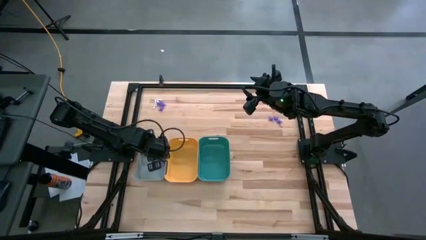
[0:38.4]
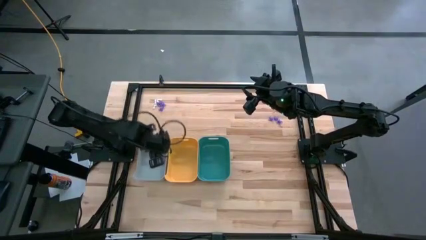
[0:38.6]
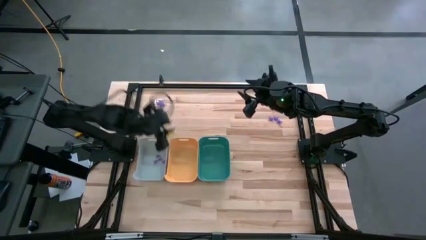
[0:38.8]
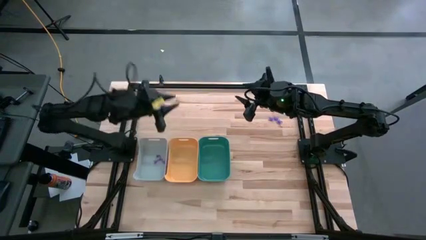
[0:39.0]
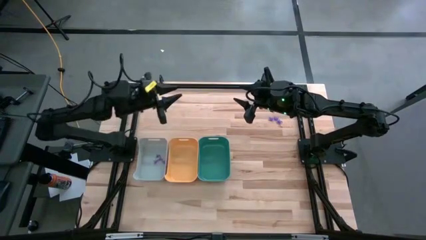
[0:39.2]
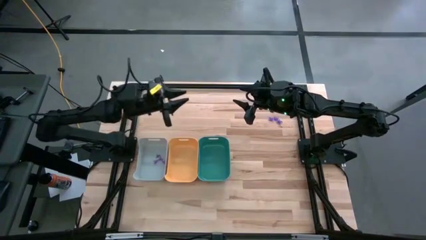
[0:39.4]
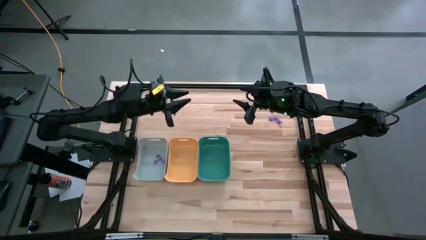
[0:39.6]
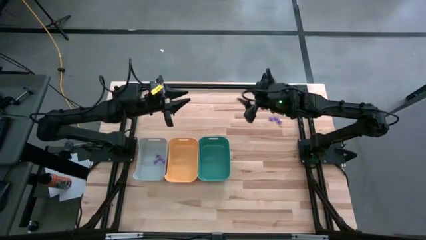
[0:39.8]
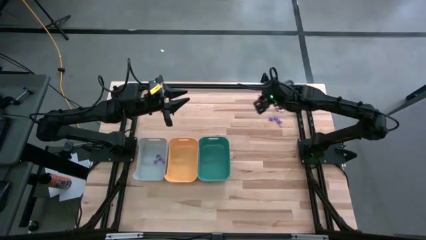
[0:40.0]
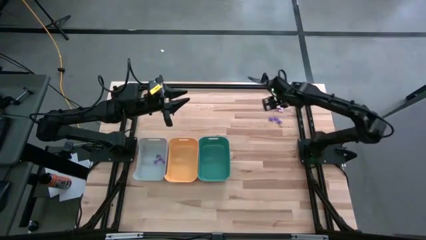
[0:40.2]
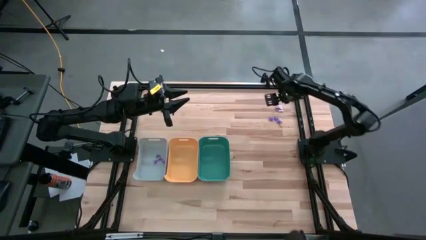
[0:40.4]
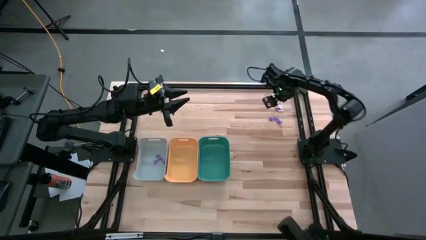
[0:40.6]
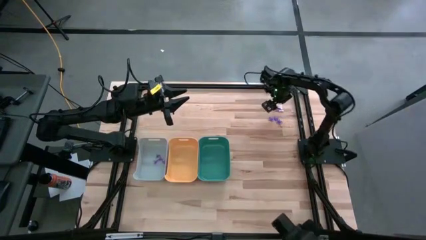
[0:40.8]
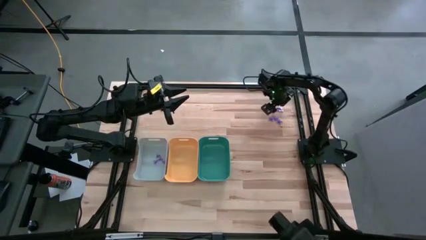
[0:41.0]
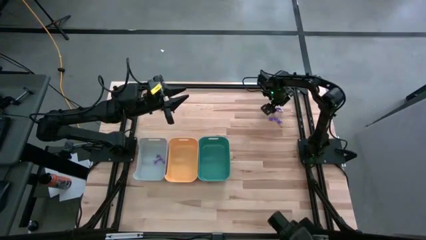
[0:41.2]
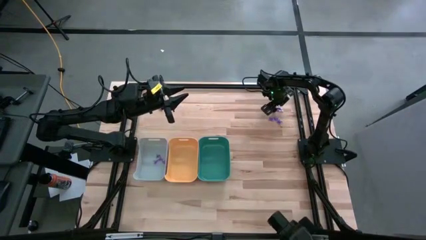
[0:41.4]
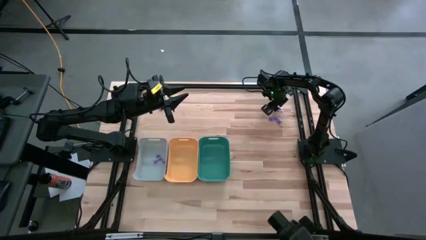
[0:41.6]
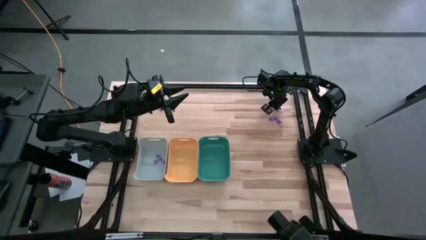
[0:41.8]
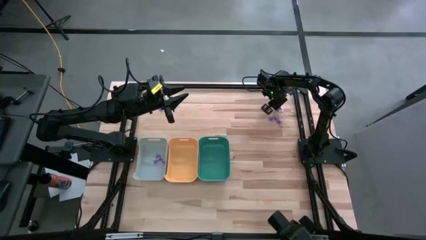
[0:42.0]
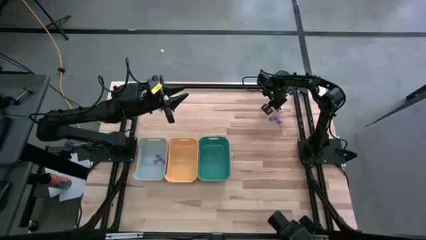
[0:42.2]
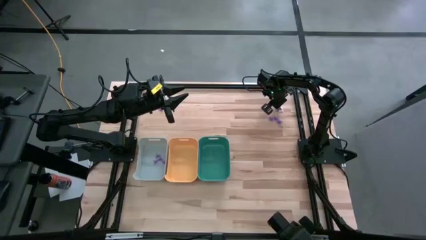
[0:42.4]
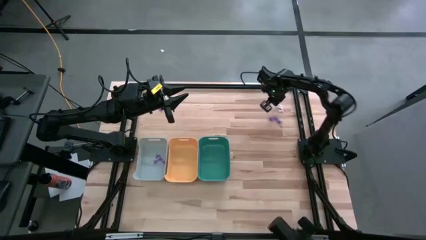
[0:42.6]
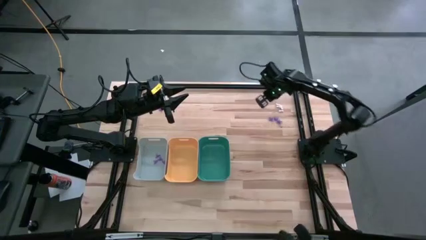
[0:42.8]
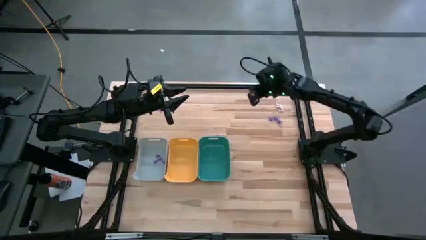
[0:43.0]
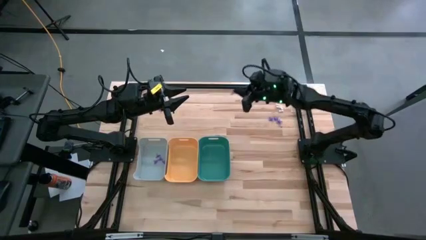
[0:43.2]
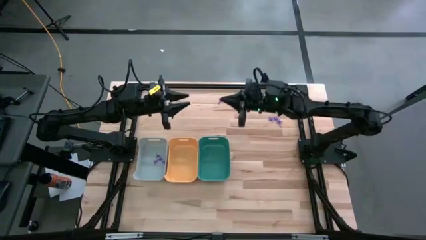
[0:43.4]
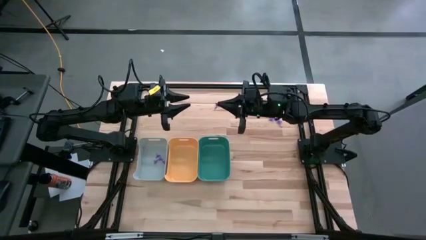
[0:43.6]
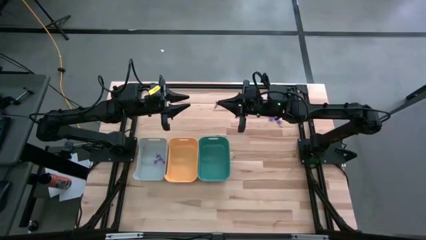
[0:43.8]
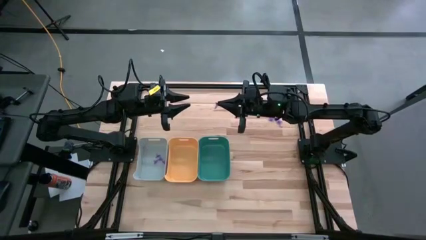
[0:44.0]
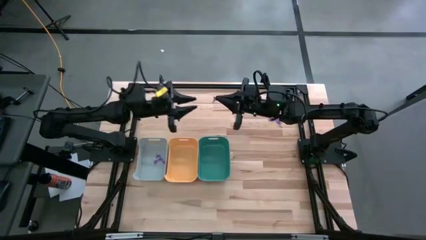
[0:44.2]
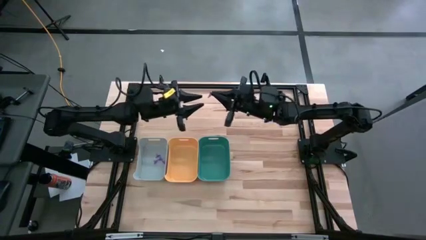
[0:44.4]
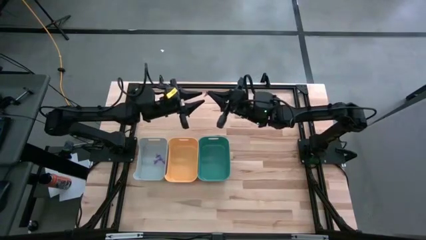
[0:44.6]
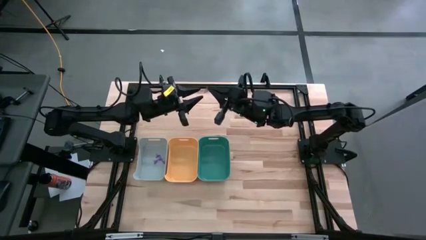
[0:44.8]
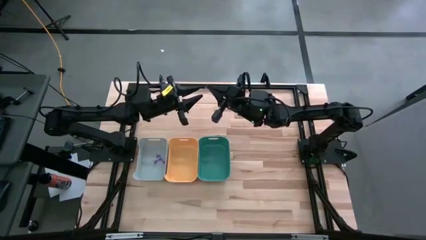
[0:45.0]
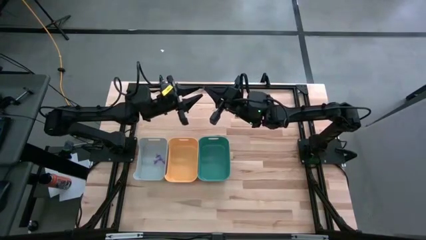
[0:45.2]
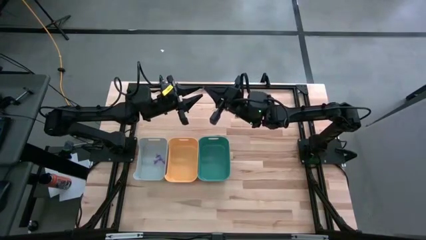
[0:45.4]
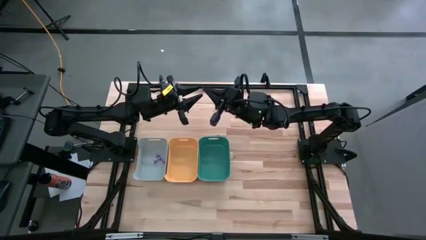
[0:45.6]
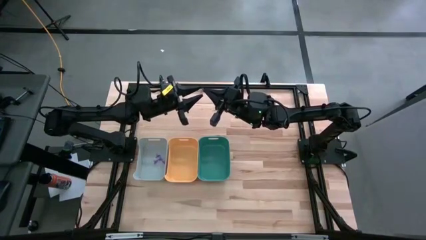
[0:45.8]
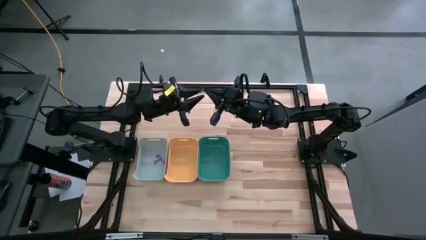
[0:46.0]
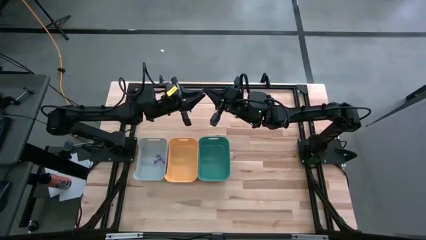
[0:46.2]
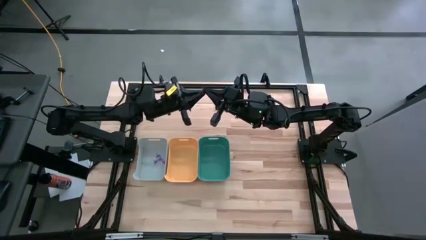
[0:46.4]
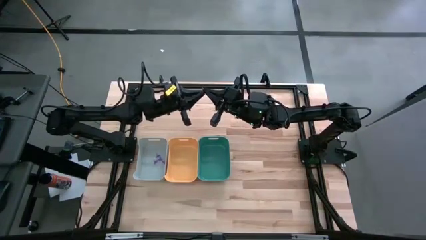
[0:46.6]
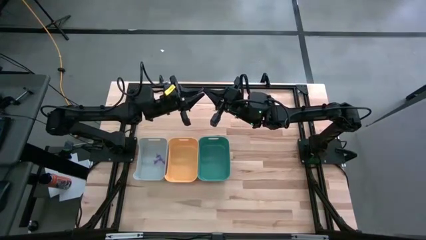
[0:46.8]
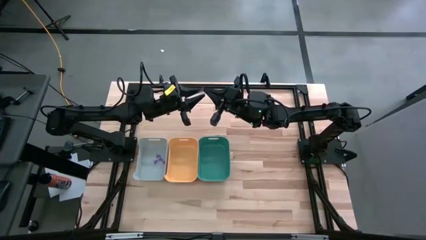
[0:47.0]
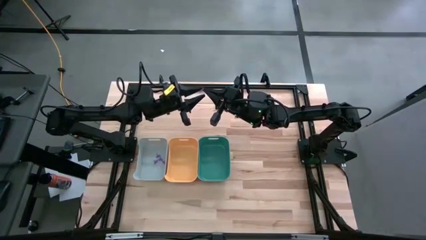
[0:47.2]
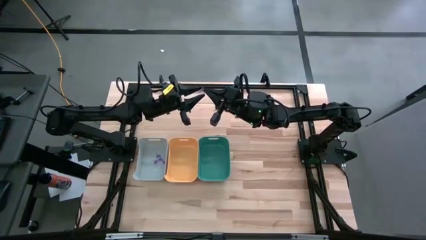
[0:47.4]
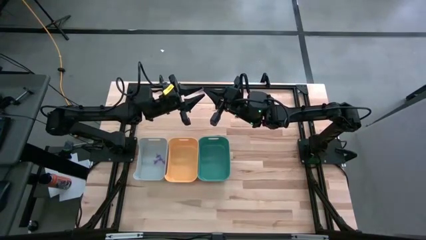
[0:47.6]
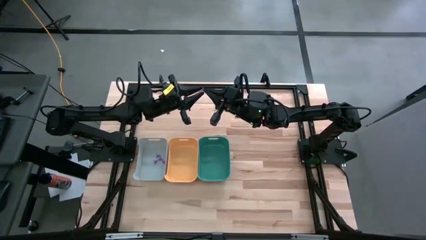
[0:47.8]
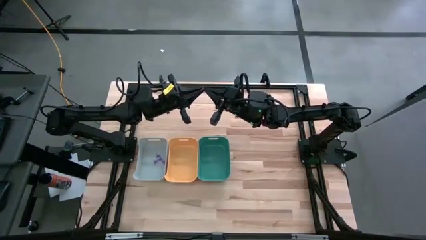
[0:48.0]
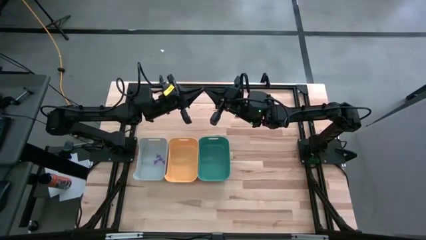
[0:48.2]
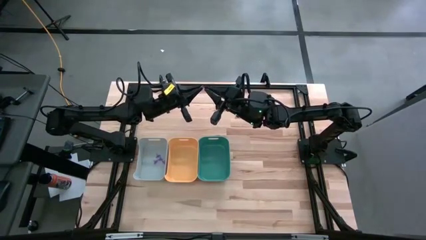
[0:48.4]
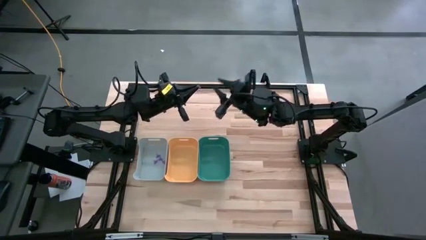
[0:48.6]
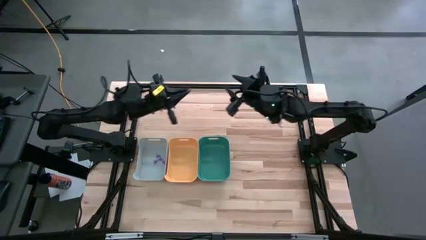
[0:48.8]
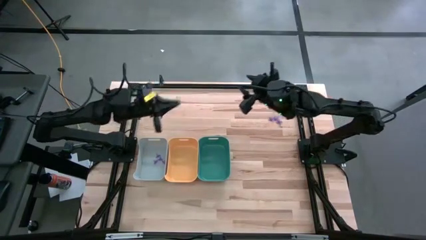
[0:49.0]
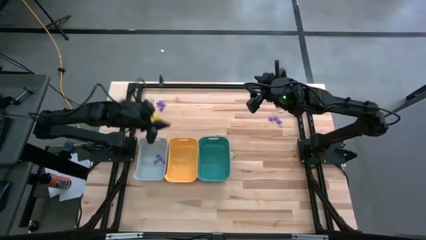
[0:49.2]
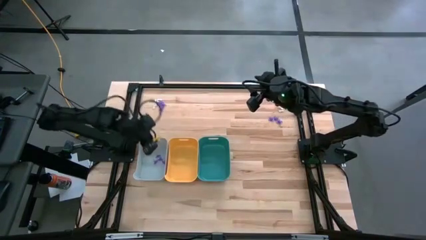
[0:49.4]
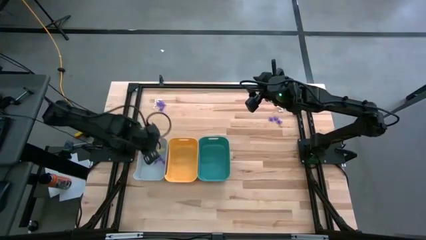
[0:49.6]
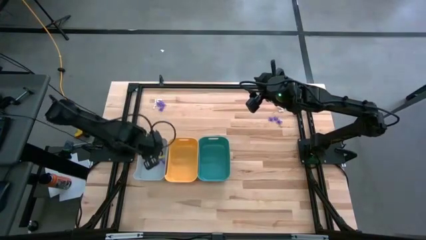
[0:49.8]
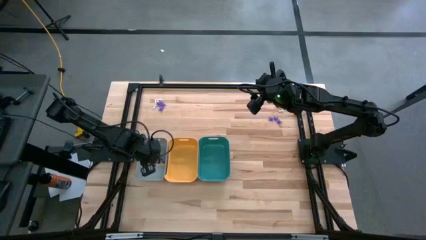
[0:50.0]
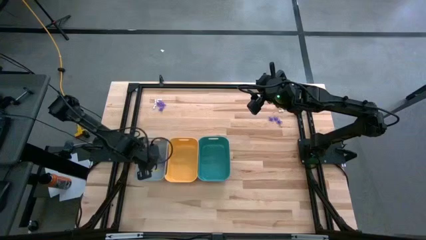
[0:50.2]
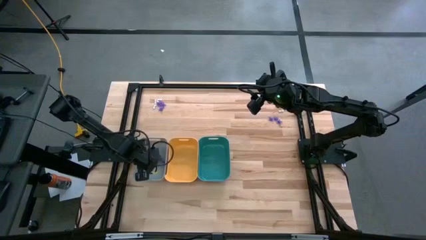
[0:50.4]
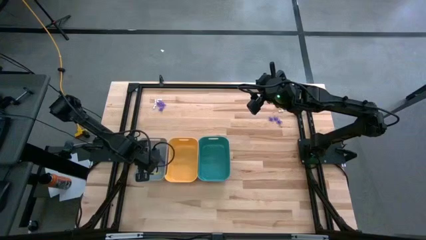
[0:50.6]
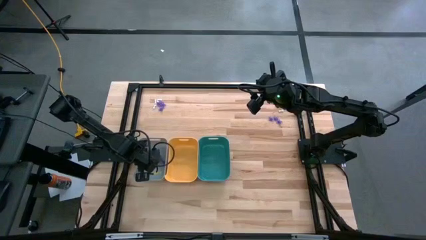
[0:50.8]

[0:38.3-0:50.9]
Task: Sort Halloween decoration
Put the purple witch hat toy into the white bin

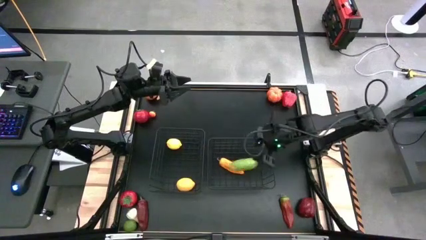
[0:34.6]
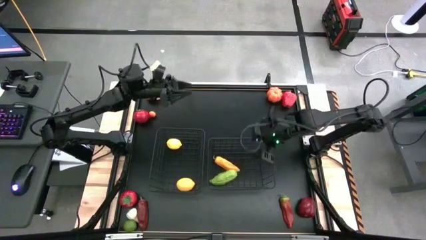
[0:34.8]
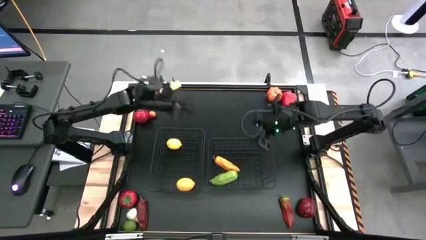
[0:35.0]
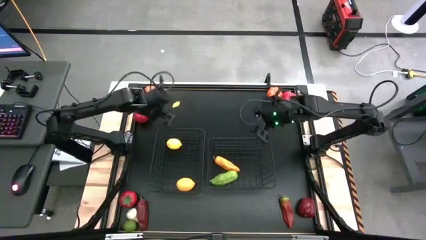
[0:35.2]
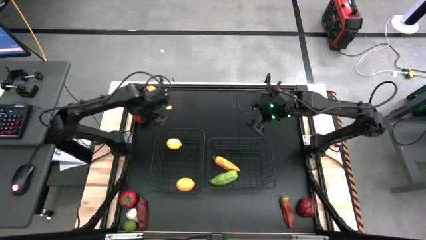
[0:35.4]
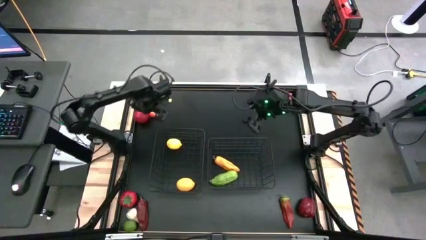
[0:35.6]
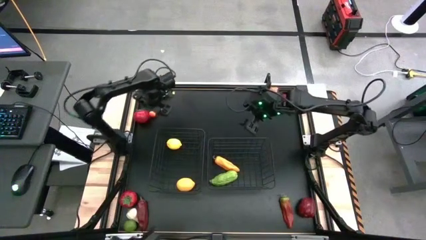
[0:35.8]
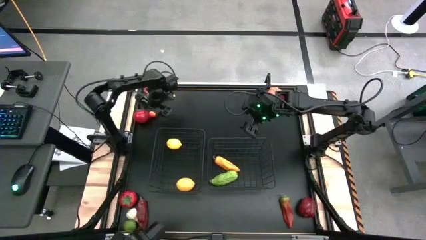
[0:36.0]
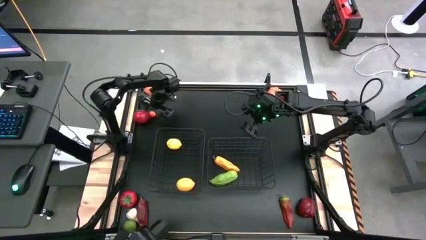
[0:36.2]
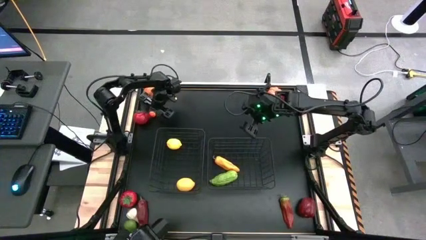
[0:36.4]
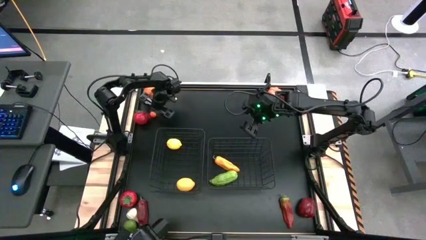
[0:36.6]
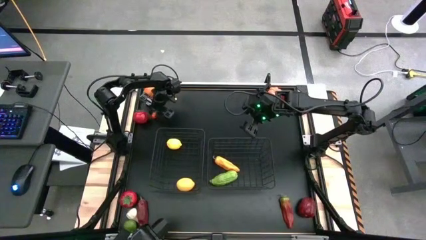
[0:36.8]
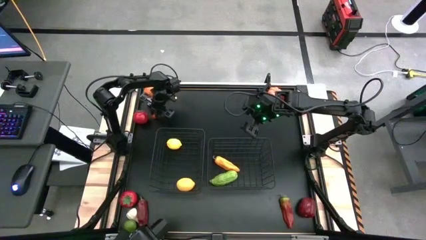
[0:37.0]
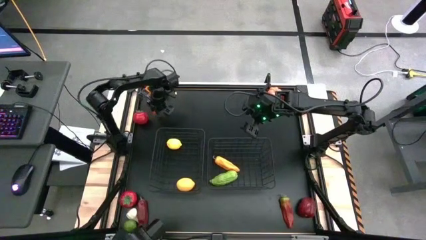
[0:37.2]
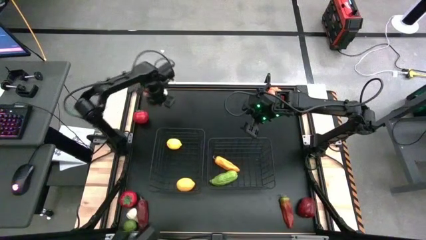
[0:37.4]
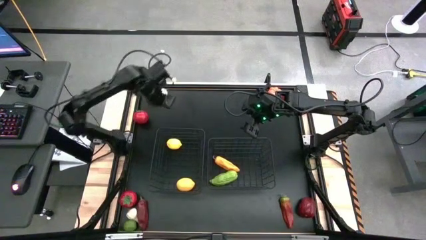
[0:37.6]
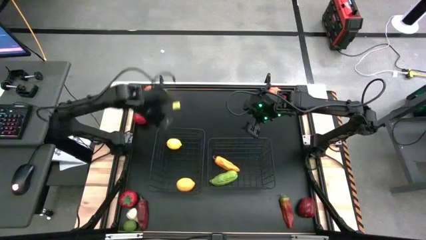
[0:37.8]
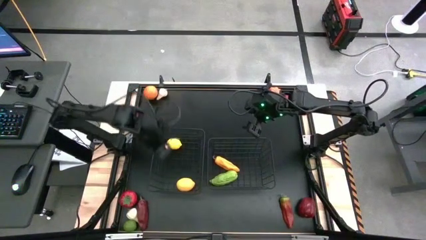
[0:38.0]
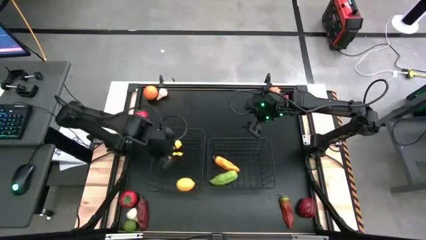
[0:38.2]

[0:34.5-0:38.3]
Task: Sort produce into baskets
Put the orange tangerine into the left wire basket
